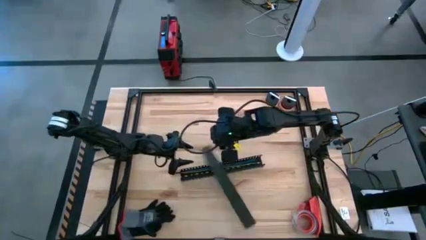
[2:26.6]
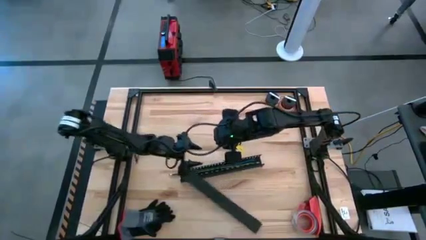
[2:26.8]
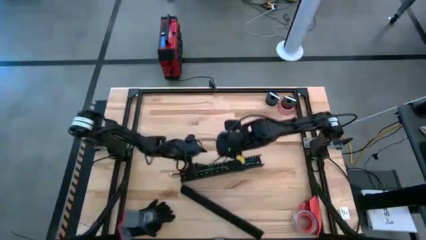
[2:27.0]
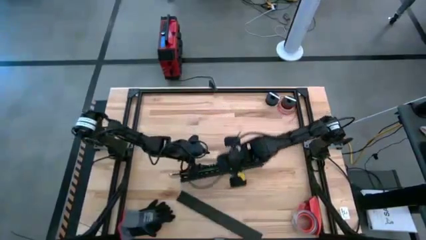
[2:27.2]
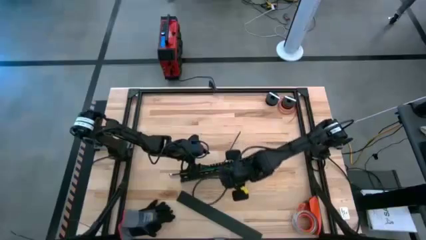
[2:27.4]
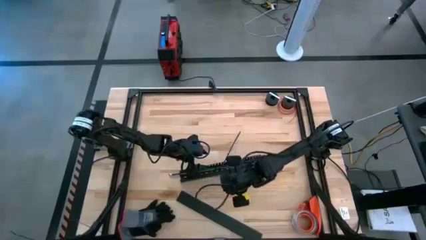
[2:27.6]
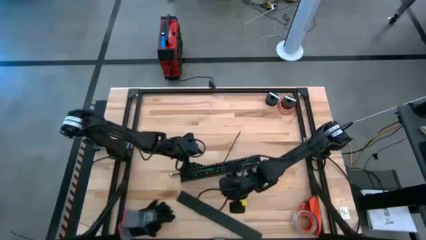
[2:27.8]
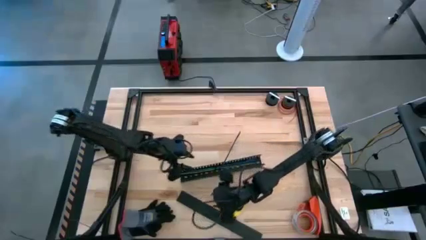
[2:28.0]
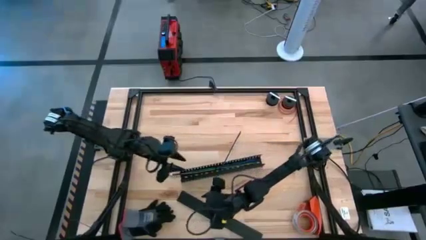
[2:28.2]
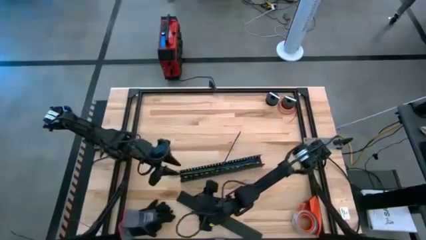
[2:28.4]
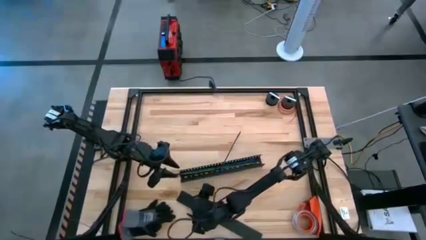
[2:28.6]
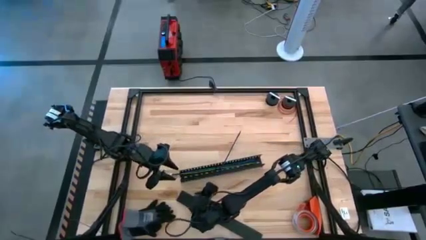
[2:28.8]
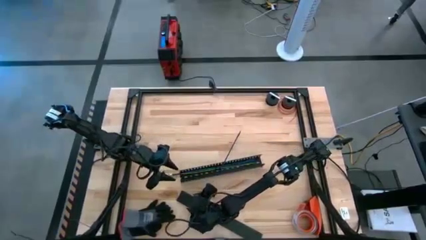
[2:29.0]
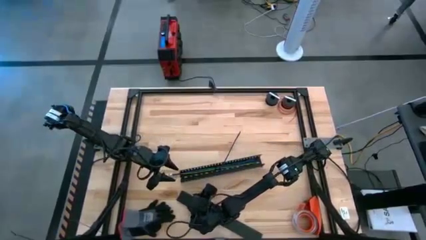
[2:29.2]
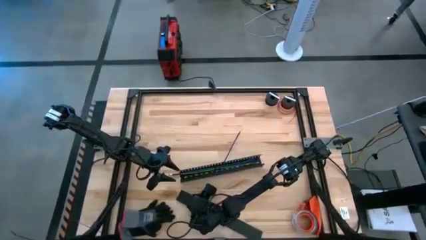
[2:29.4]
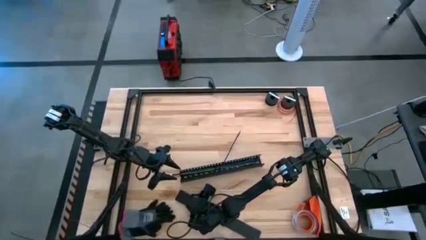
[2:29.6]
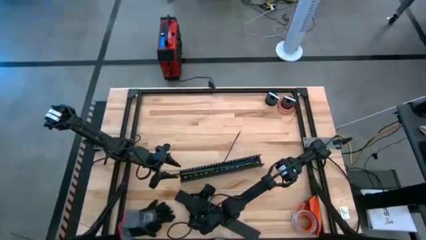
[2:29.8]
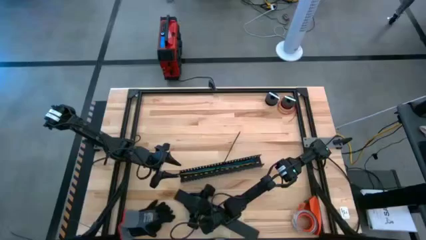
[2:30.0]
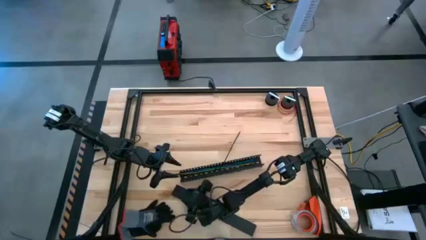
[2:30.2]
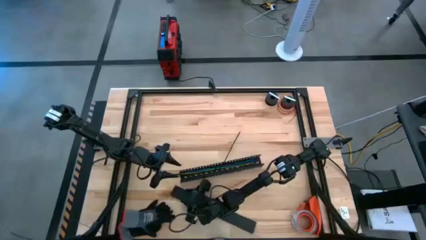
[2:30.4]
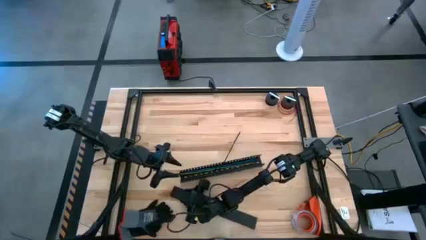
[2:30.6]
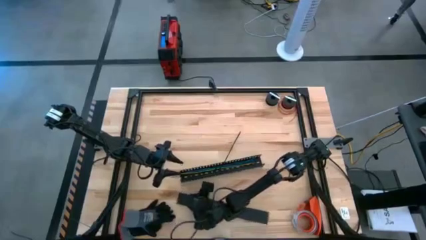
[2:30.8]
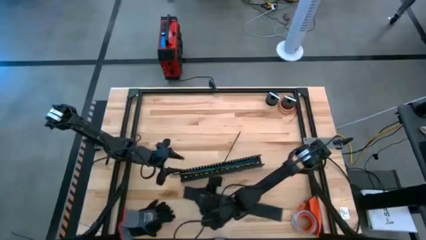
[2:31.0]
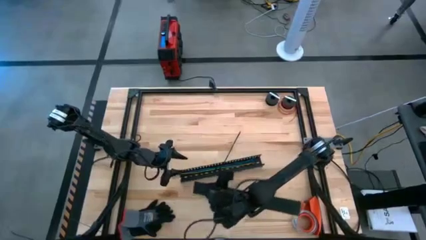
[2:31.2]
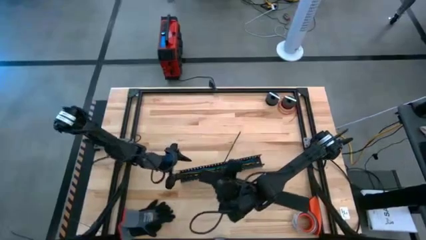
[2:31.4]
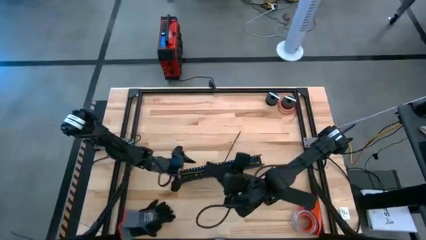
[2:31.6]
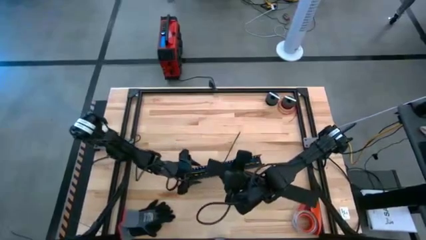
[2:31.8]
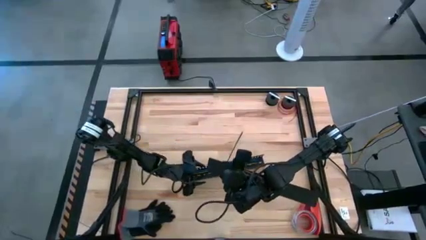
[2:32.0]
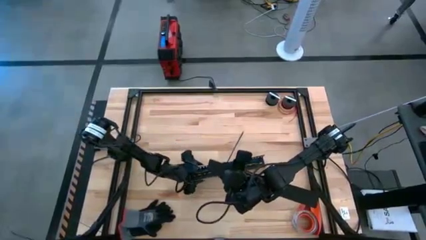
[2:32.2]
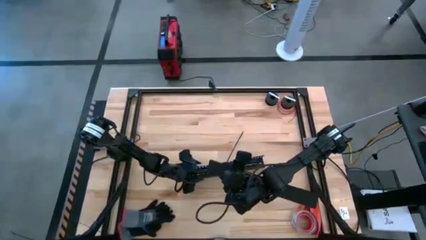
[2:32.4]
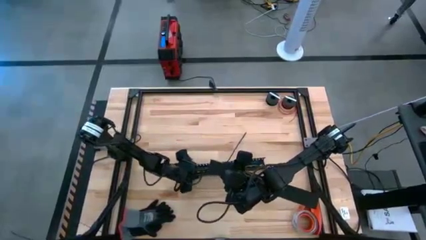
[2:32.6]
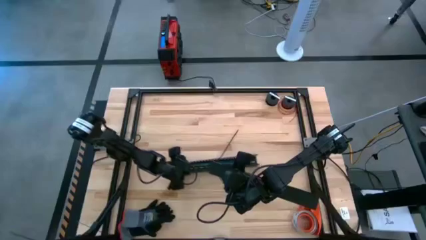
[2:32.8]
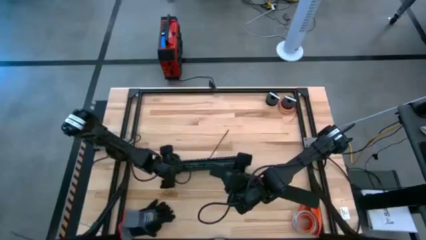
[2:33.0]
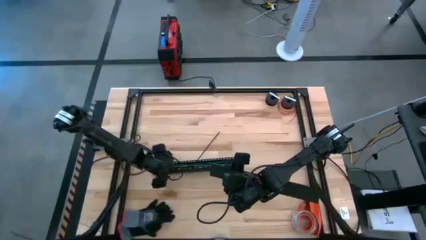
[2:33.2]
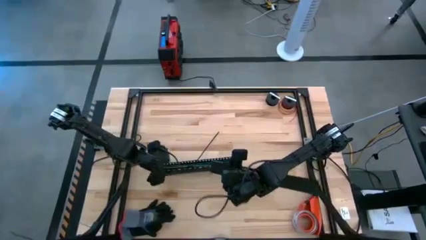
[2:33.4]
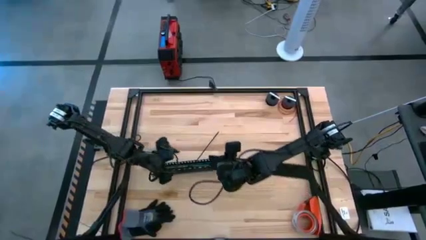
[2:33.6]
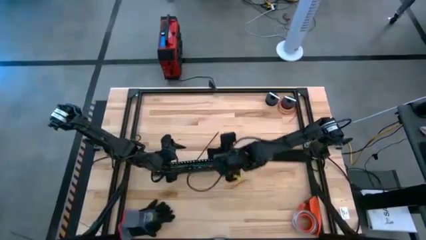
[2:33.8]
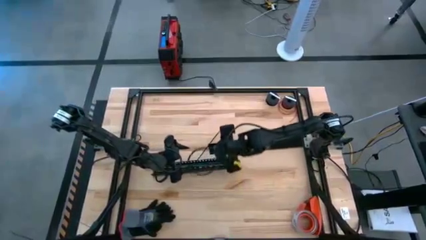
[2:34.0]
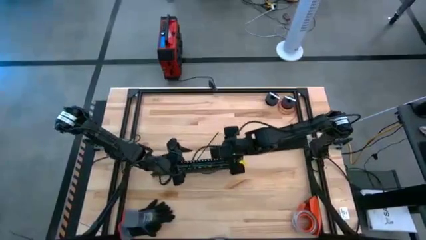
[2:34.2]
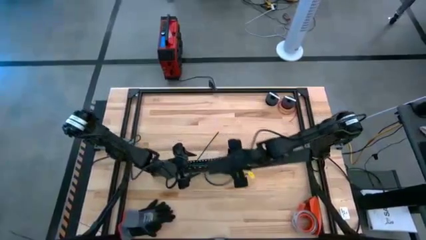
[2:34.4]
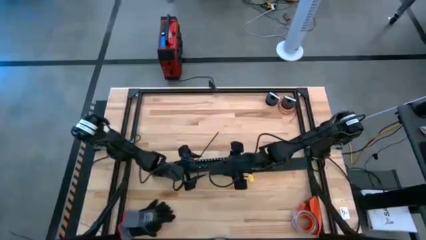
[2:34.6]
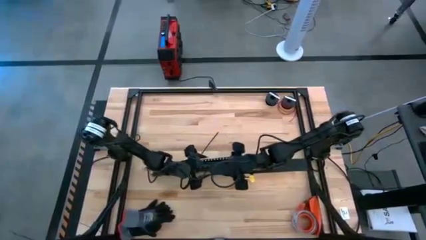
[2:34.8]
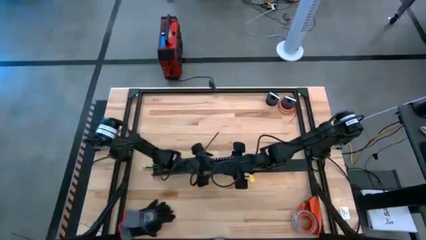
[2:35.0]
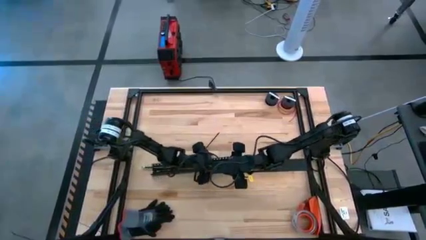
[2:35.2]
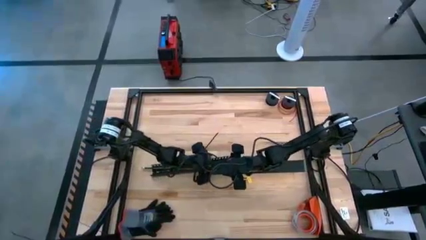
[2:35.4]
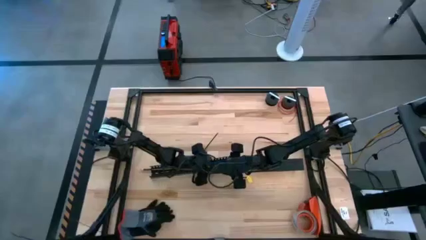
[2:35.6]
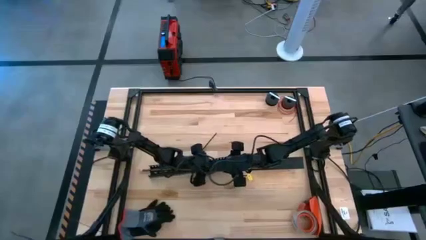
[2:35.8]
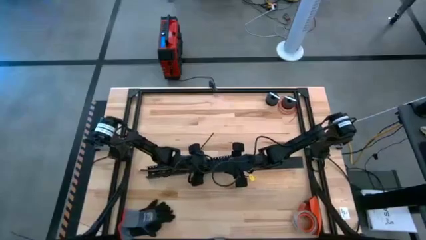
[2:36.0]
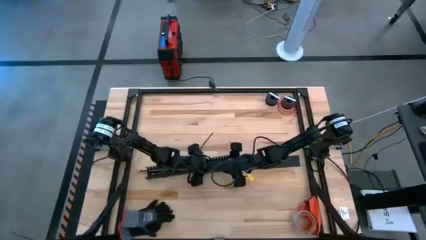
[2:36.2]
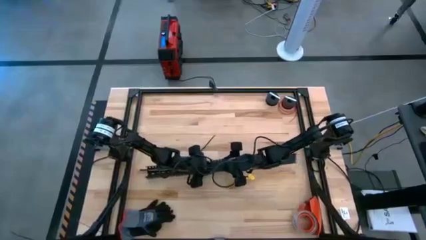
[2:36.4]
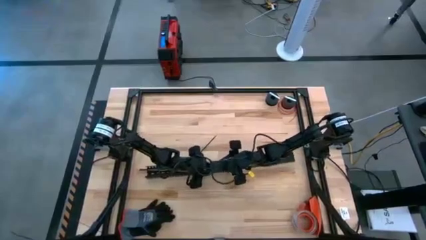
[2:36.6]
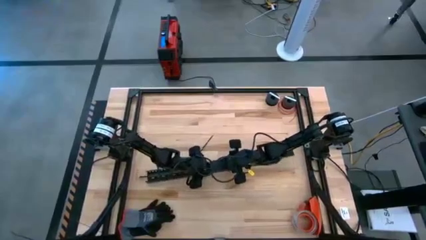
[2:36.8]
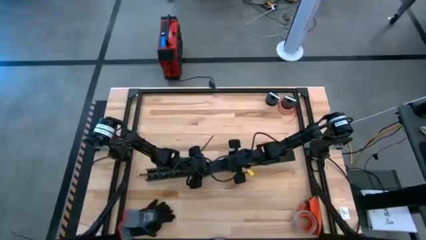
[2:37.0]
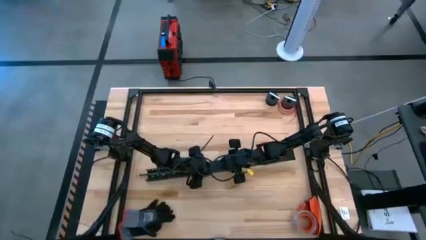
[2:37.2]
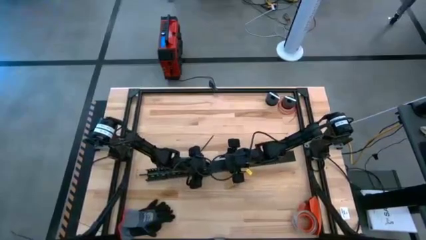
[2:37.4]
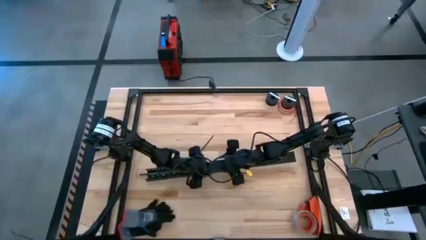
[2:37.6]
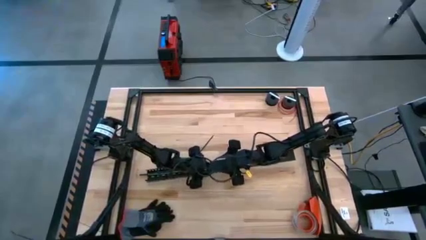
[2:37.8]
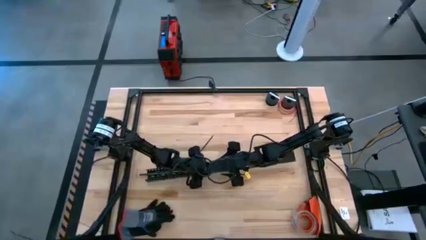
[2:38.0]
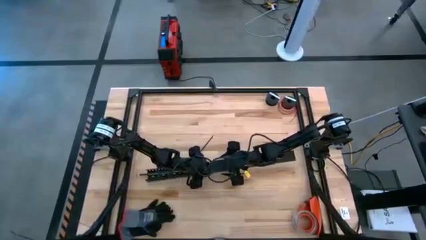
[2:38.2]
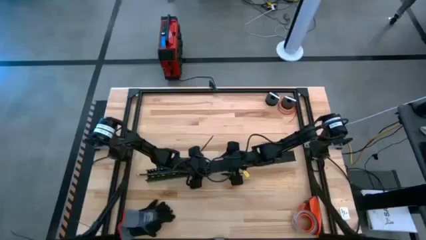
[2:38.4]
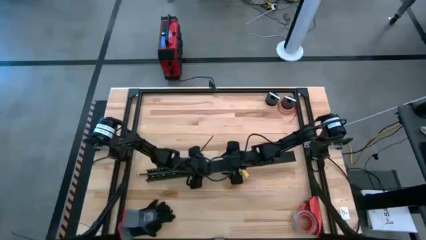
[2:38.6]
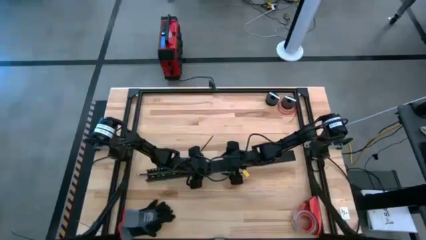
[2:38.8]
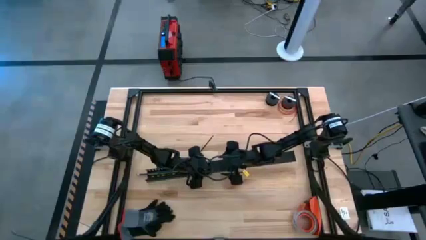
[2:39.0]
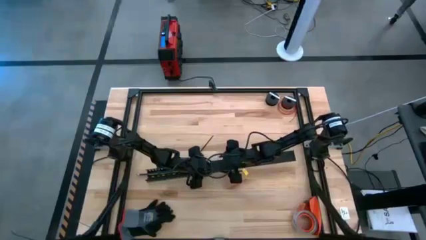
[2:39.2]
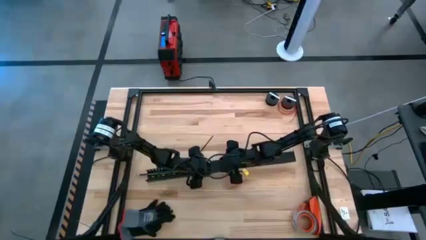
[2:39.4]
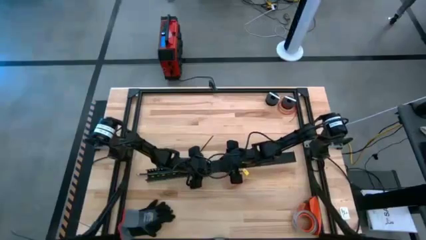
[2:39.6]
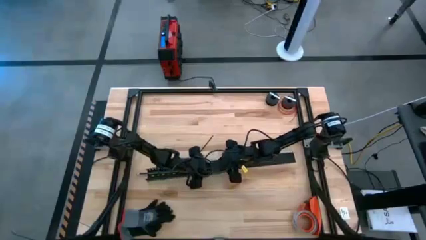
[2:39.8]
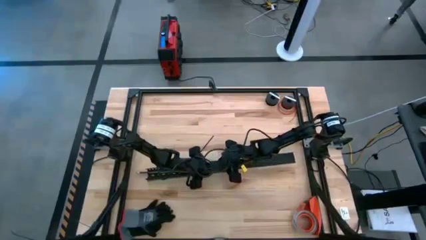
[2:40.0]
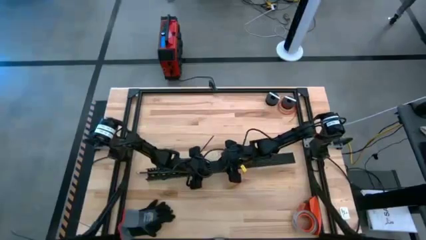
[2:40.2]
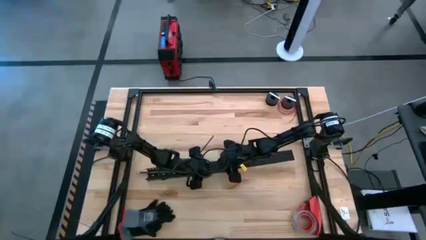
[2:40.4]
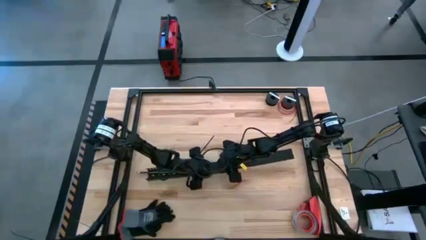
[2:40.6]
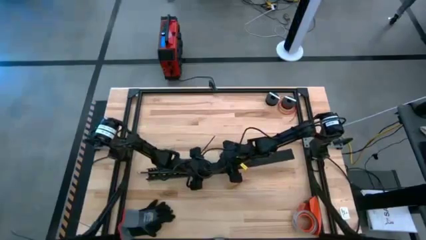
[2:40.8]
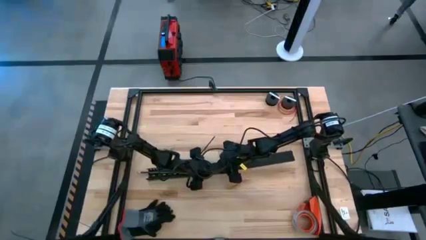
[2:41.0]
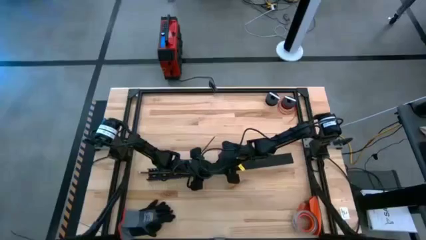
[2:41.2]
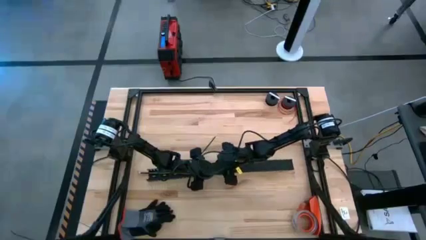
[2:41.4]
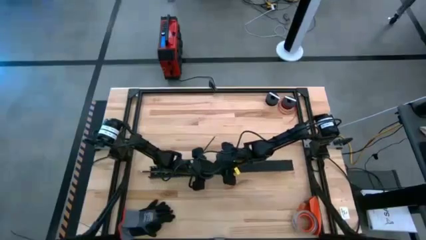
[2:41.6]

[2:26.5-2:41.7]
Task: Ziptie cables
Insert the cable duct cover into the cable duct

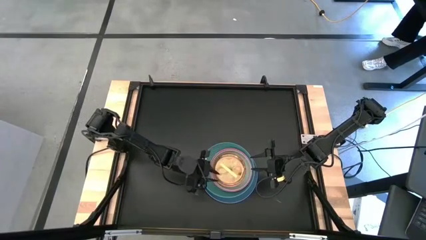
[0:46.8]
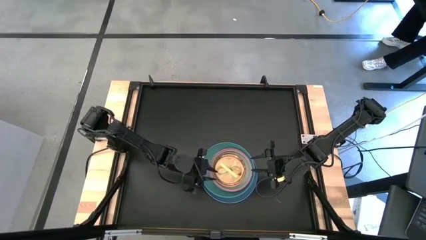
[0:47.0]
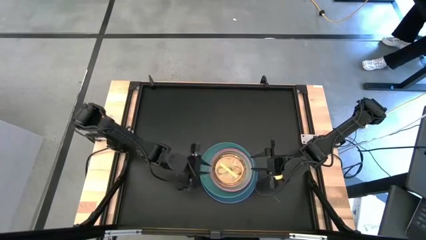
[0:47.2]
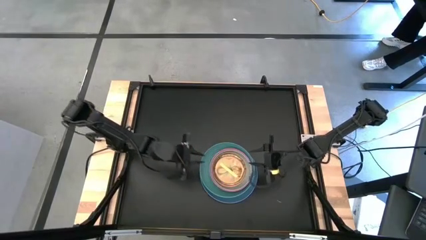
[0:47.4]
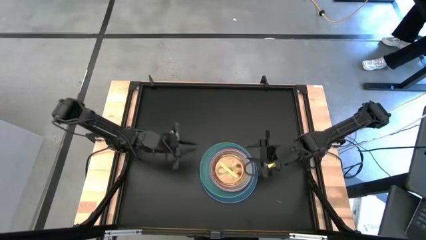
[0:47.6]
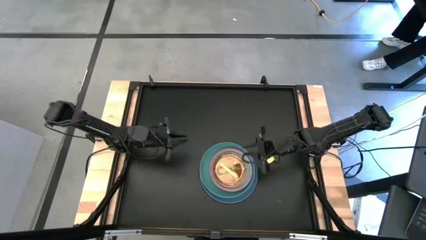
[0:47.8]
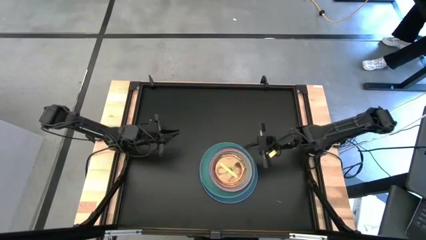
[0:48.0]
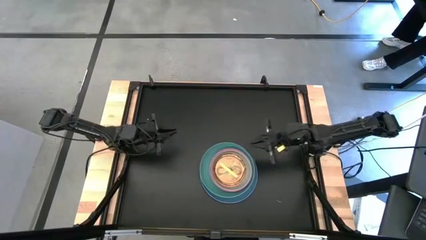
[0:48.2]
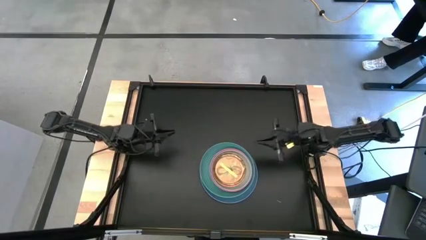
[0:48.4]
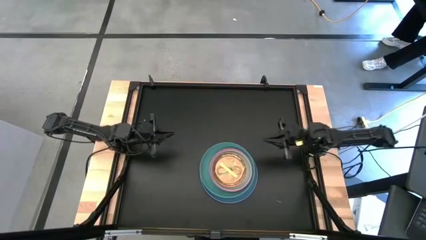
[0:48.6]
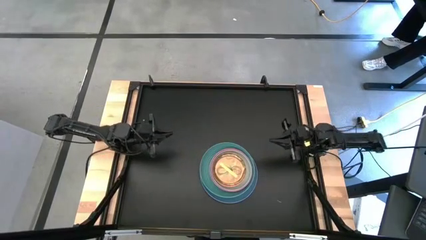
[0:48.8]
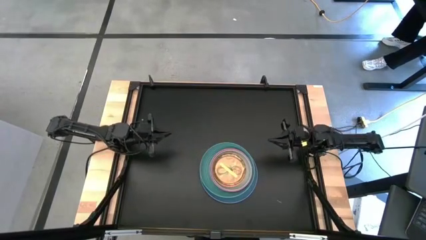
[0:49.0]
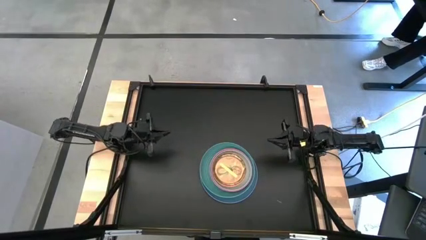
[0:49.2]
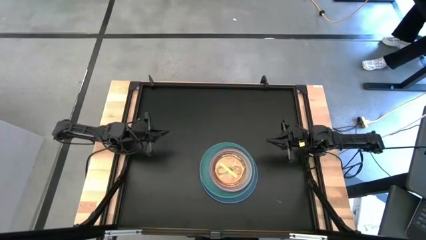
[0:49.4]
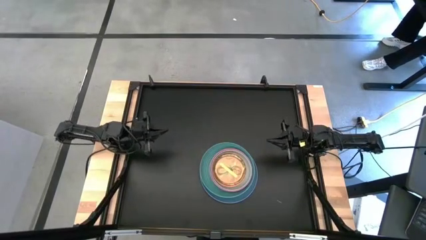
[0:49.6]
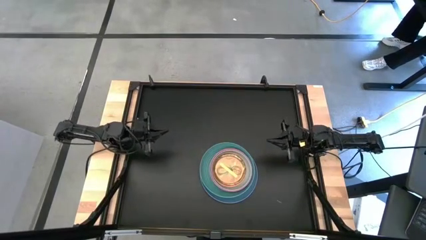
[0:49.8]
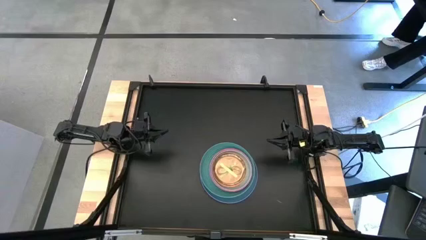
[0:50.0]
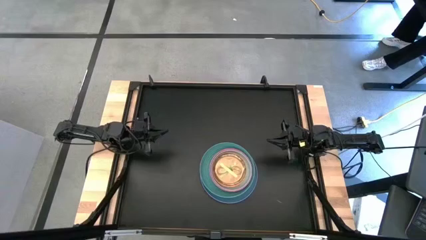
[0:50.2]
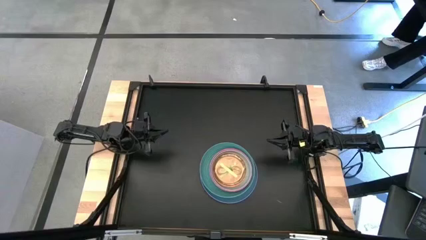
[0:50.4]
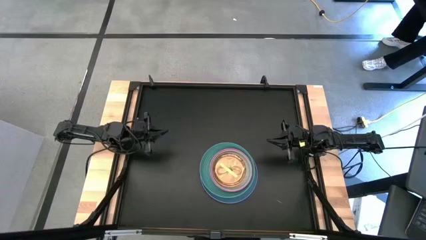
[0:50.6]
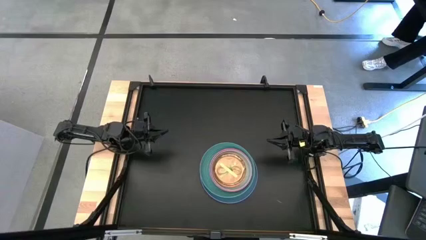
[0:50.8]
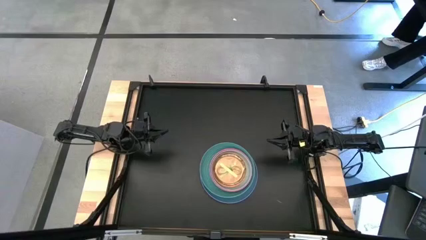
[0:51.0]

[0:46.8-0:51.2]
Task: Stack plastic plates
Return to Home Position
